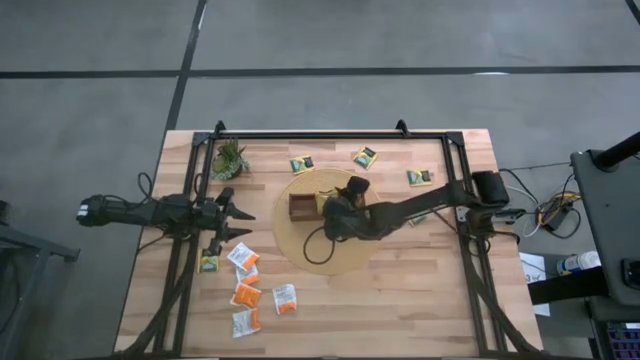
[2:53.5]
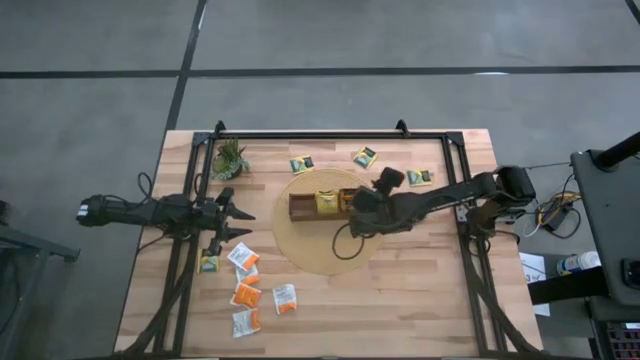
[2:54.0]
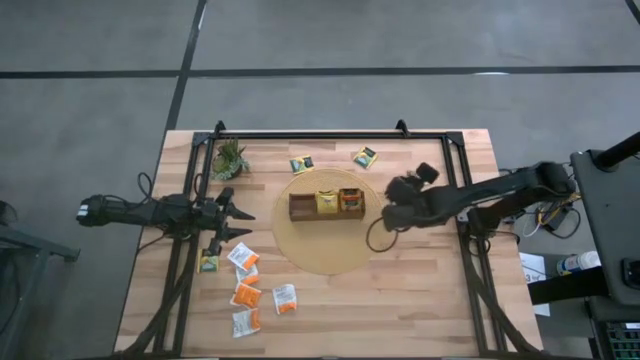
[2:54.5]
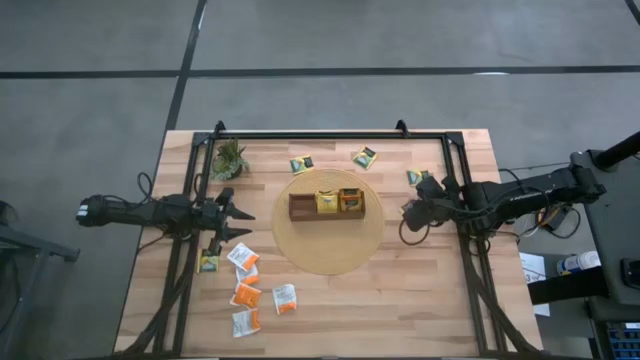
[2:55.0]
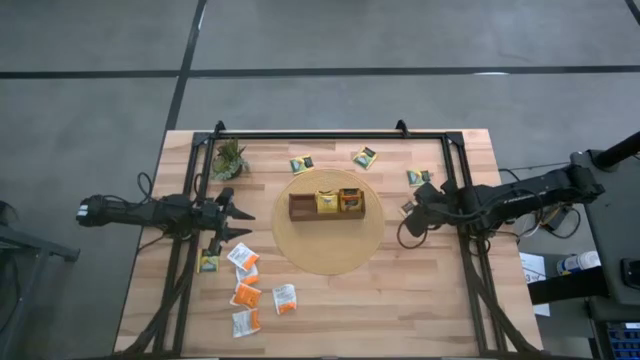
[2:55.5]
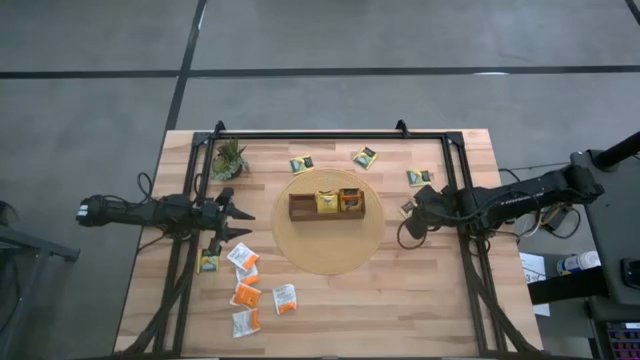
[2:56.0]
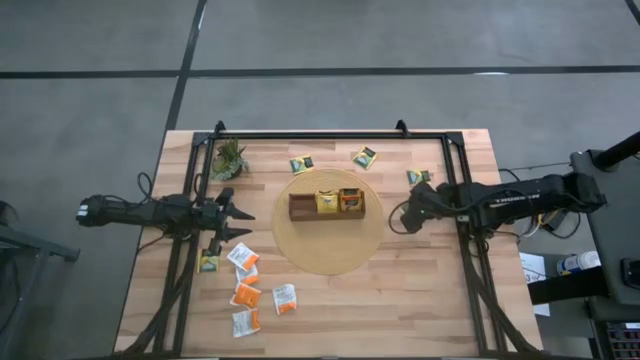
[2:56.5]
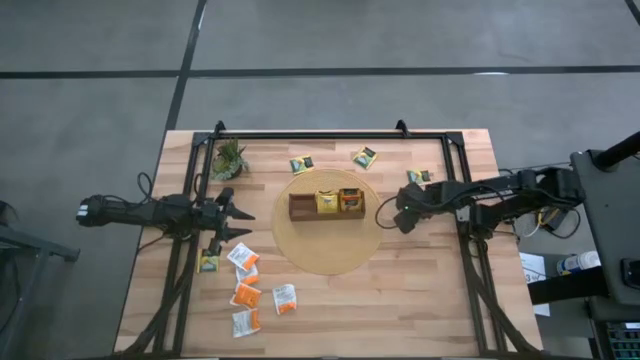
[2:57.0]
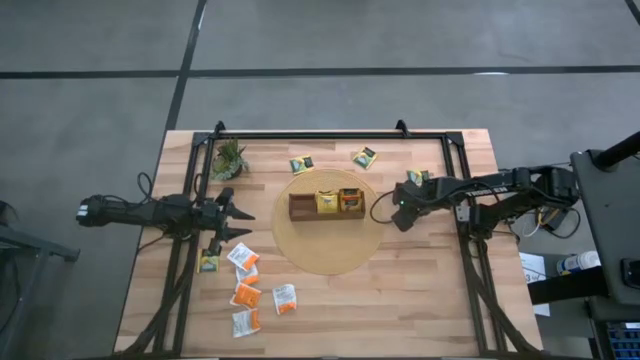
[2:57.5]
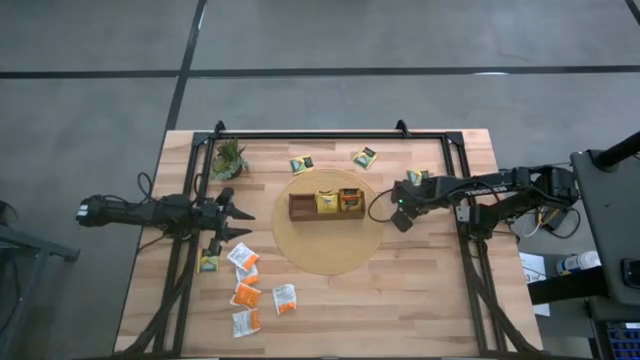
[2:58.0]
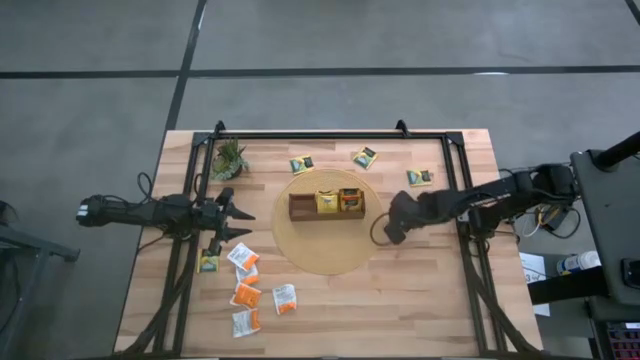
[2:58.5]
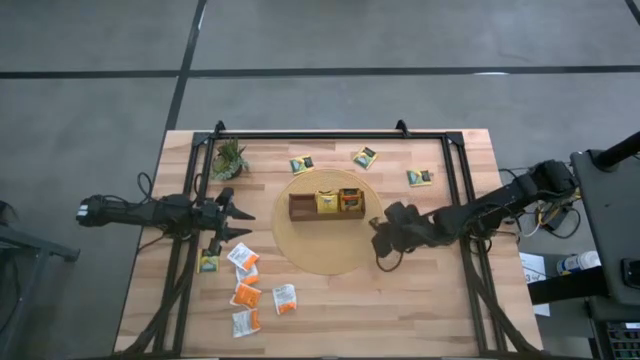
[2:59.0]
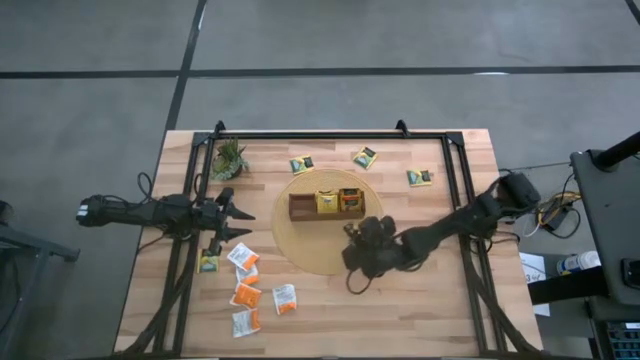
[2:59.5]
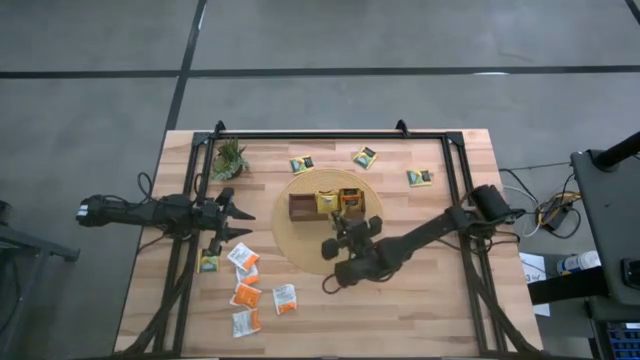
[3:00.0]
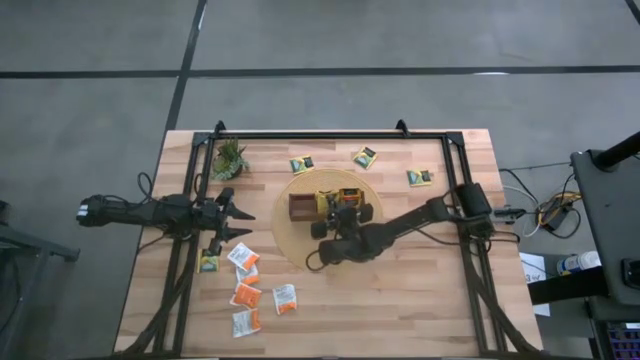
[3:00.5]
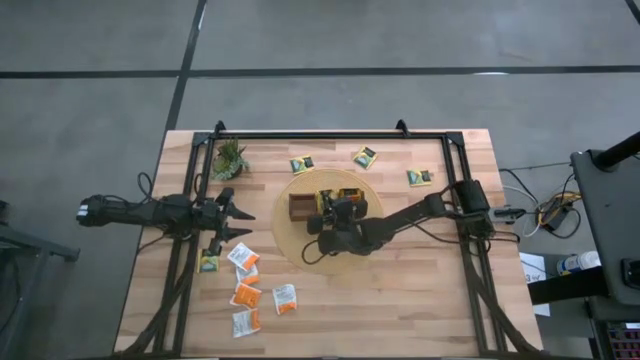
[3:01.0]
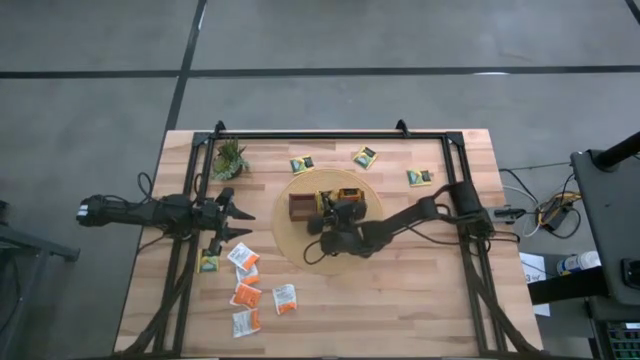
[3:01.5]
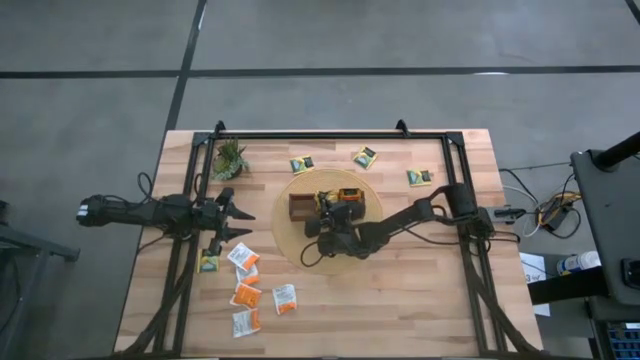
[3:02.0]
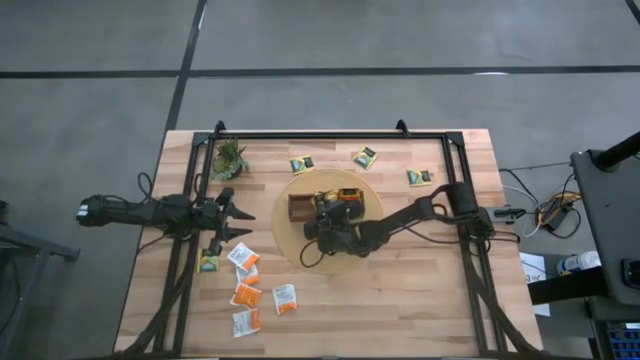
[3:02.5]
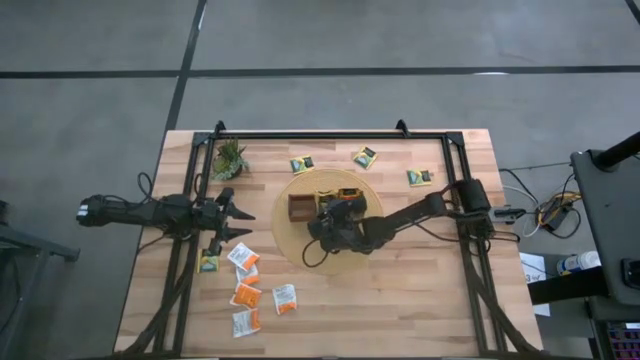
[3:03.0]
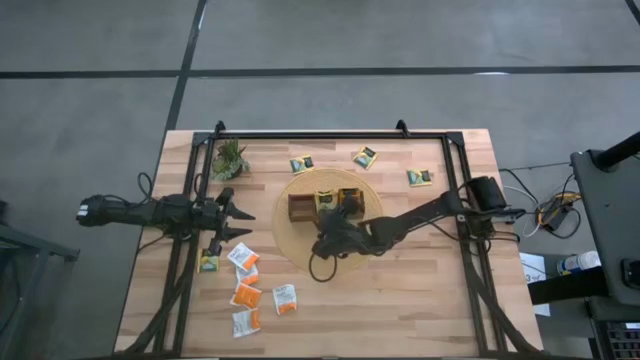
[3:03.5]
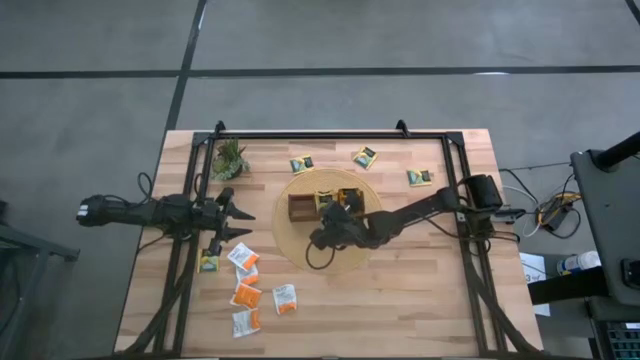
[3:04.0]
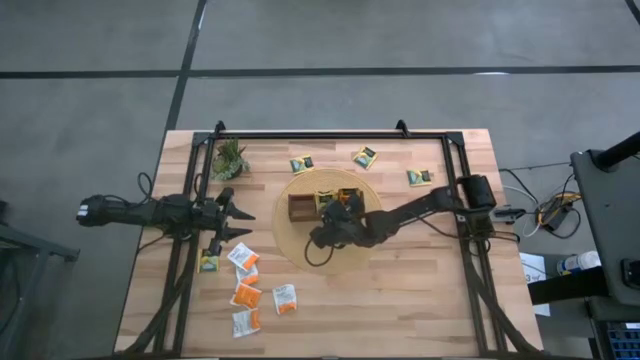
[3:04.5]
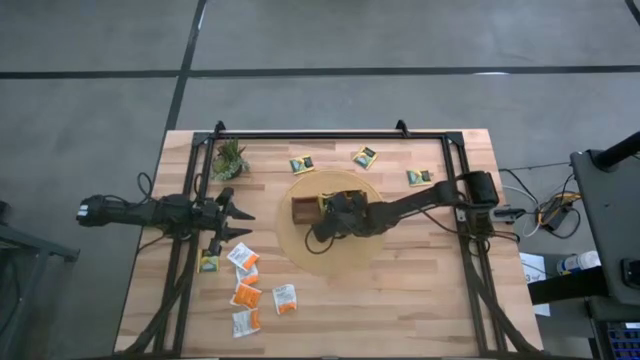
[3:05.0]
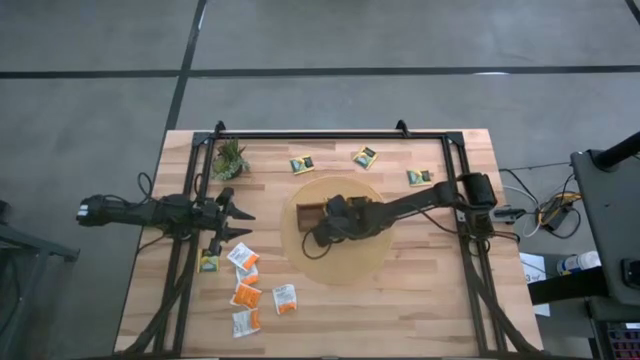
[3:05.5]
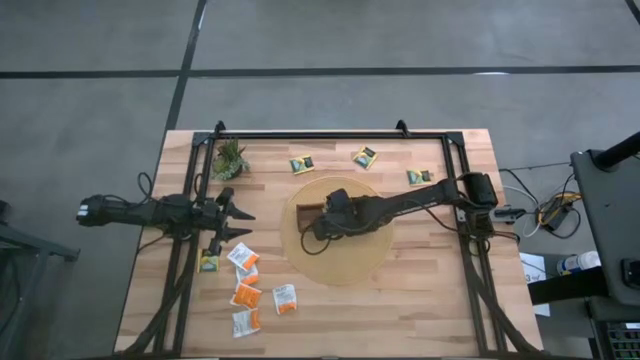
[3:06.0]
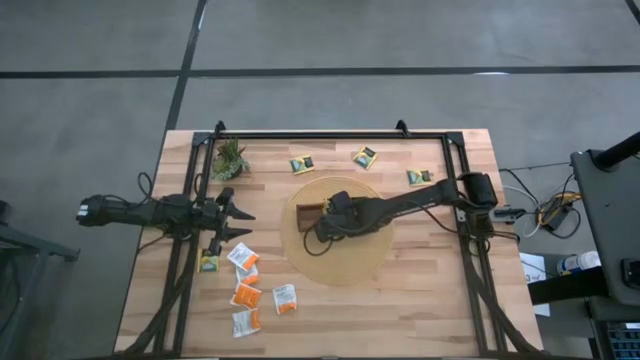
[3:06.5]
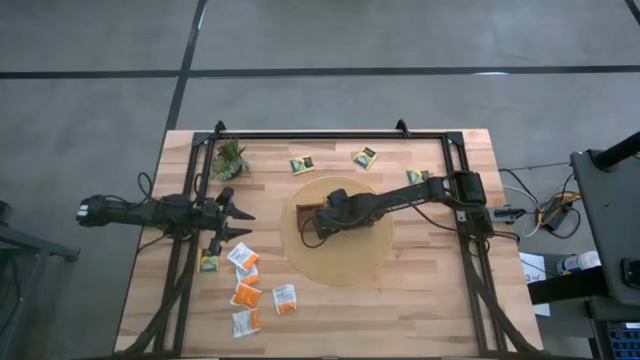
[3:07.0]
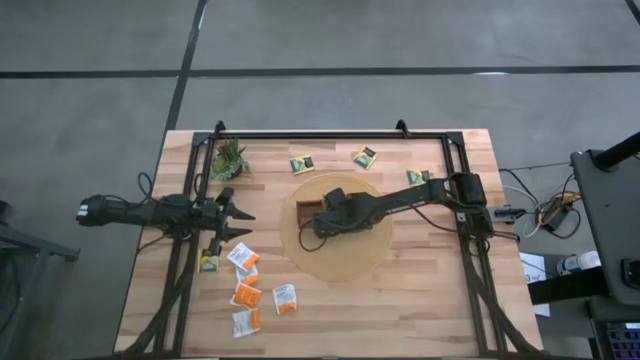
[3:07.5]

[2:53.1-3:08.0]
Task: Pick & Place Tea
Put the yellow tea bag into the middle section of the wooden organizer

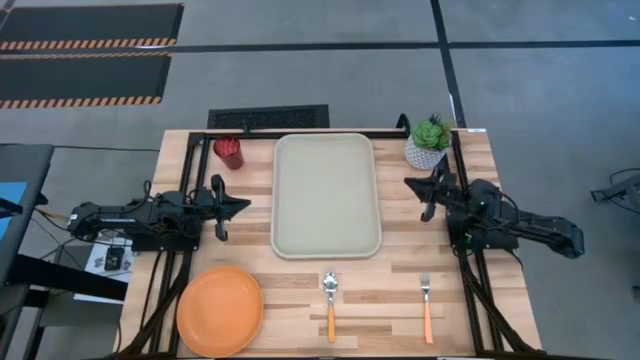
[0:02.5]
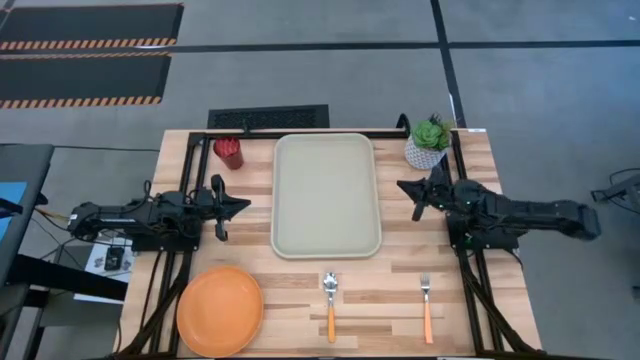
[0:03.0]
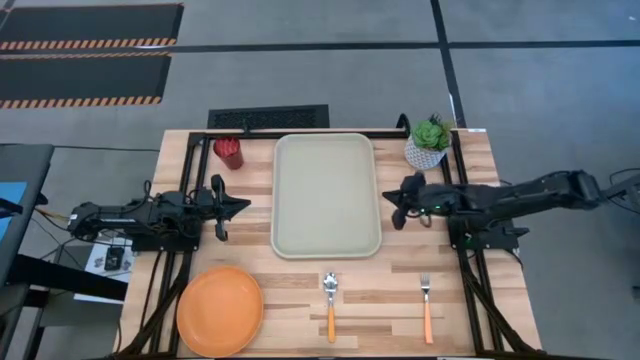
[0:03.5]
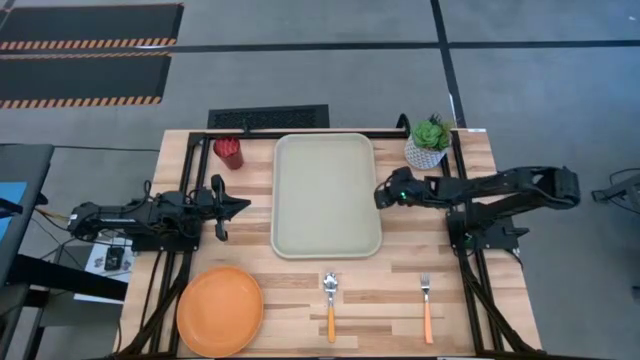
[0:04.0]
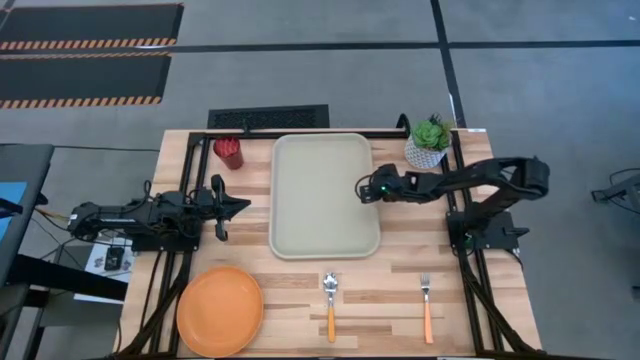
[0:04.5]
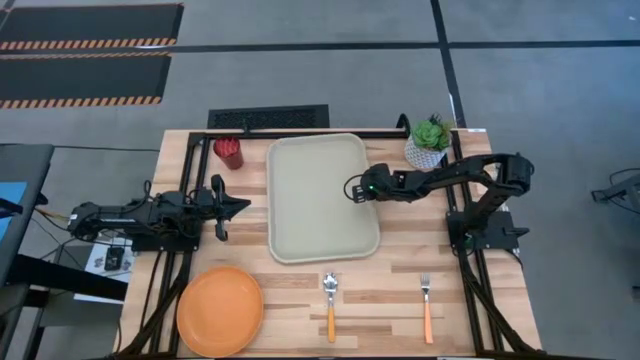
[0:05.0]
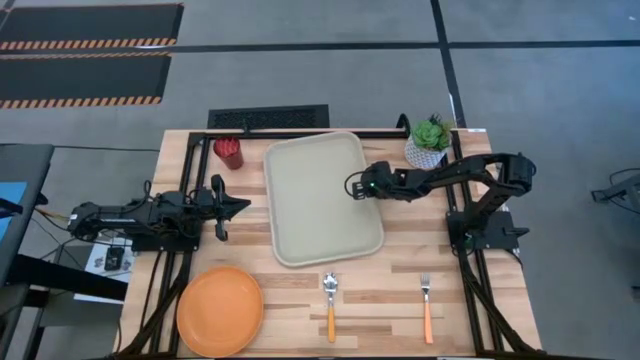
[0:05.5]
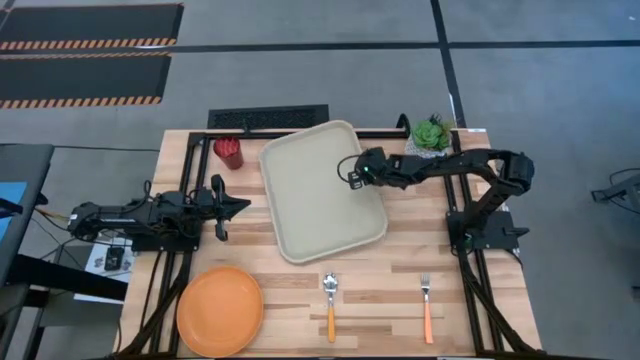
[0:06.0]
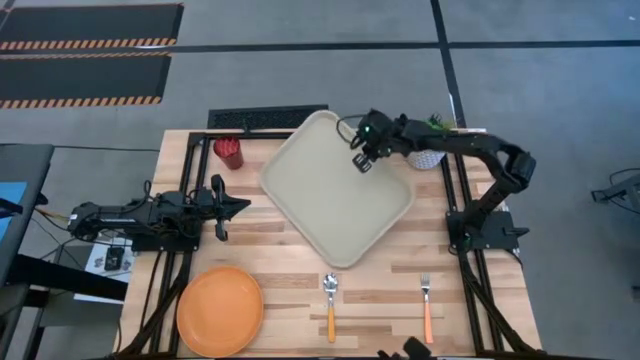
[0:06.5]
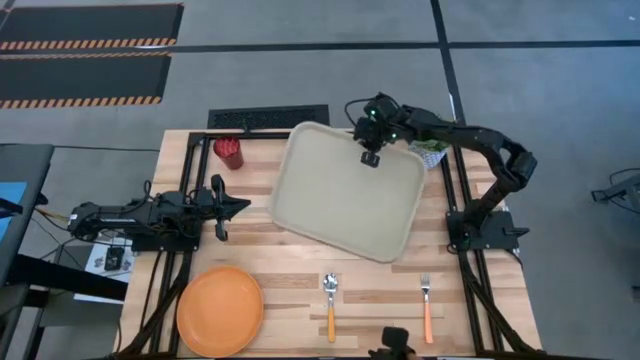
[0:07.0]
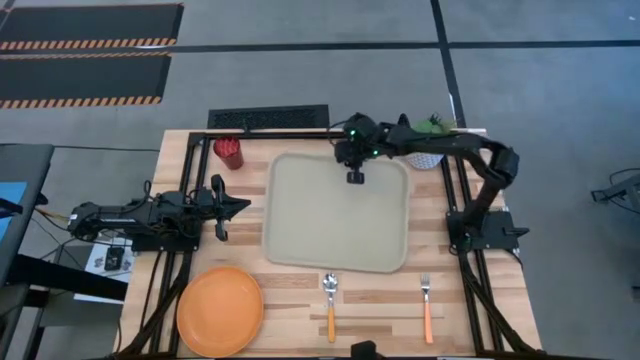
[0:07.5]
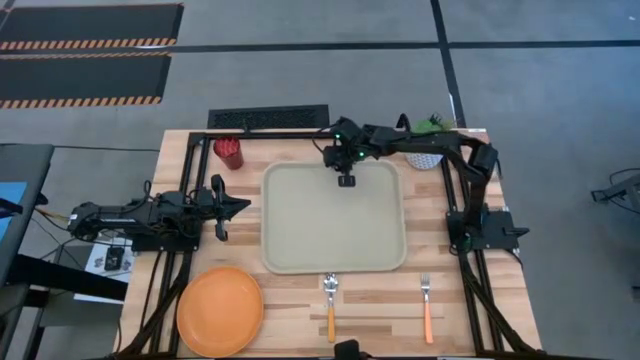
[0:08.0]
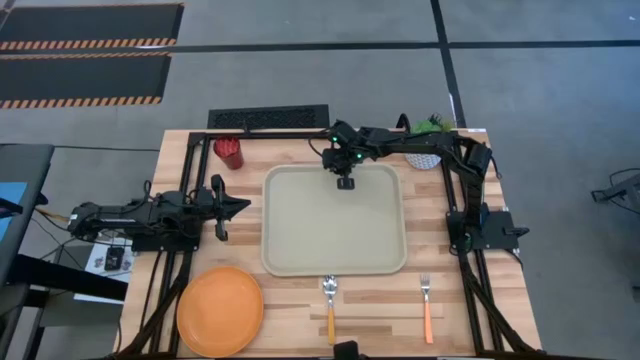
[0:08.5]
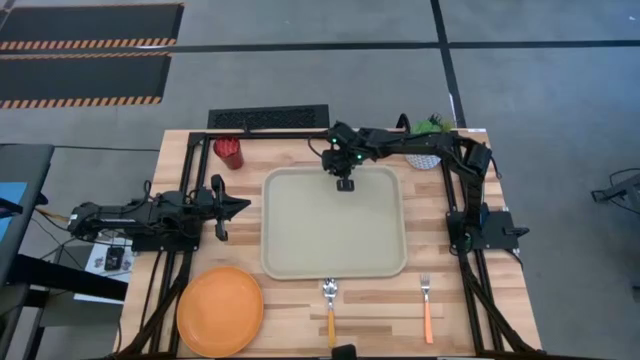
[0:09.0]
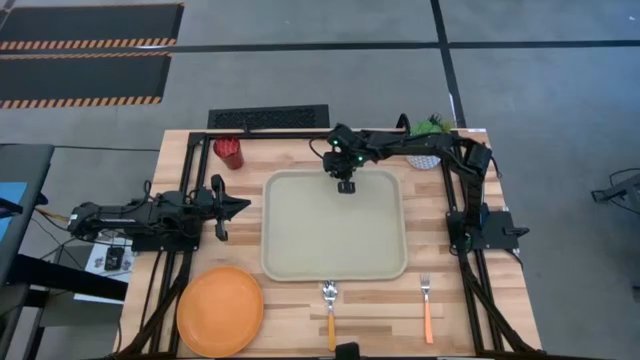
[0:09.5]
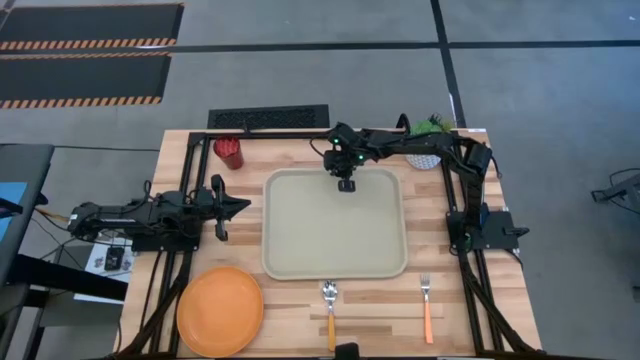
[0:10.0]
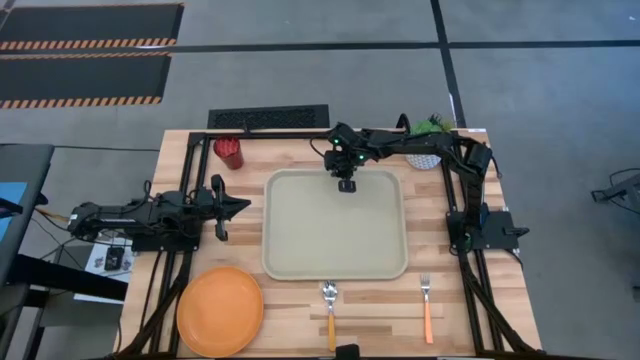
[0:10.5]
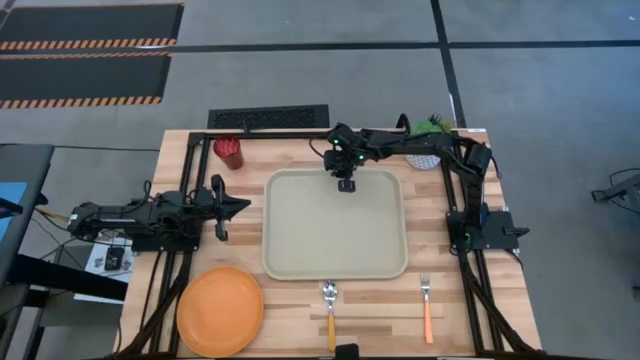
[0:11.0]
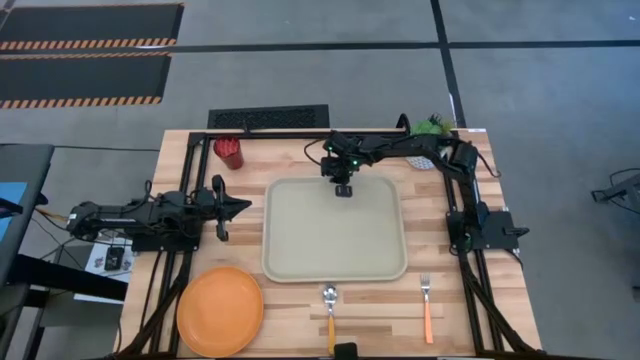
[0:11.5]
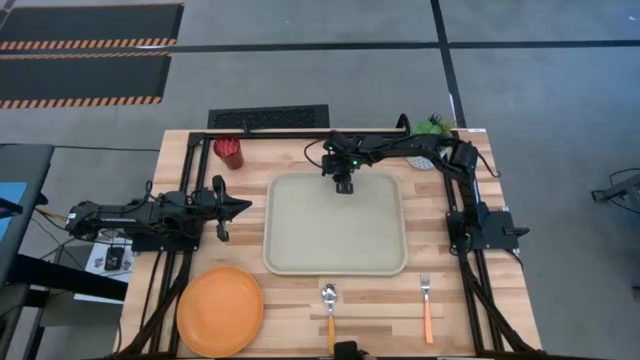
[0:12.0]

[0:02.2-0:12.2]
Task: Pick and place plate/cup/fork/spoon on tray
Prepare the light brown serving tray
